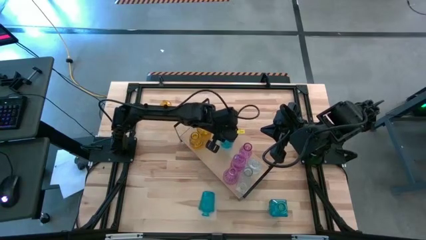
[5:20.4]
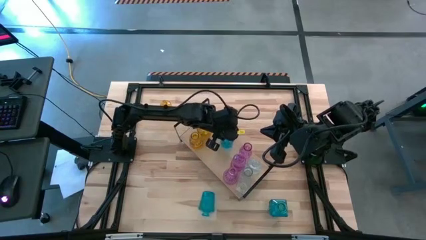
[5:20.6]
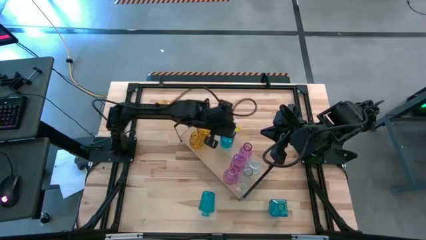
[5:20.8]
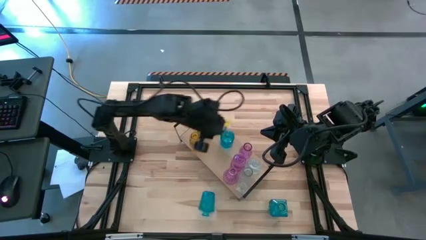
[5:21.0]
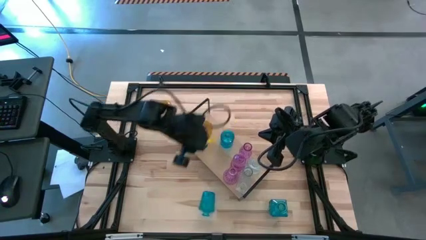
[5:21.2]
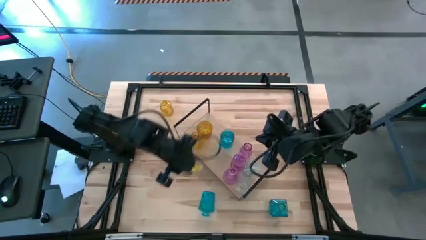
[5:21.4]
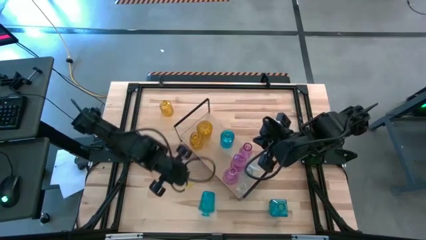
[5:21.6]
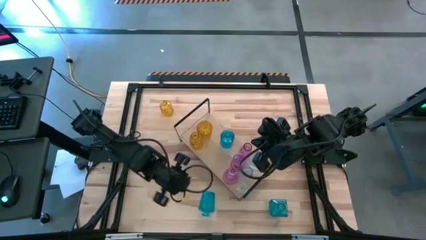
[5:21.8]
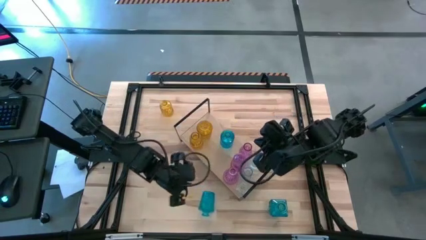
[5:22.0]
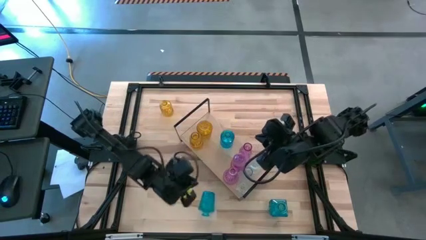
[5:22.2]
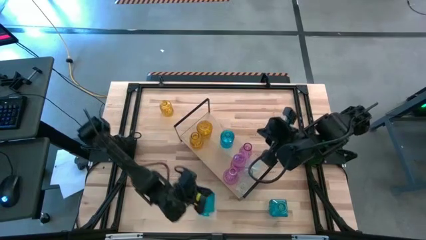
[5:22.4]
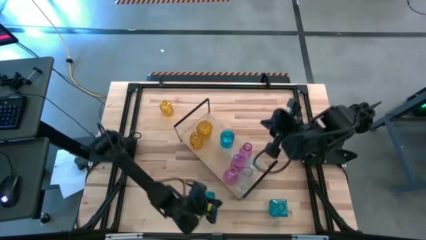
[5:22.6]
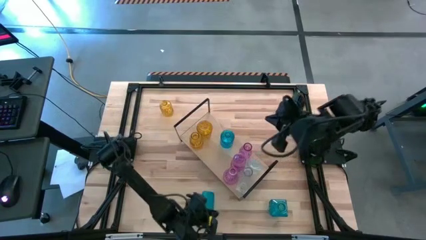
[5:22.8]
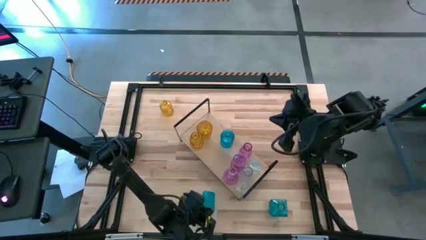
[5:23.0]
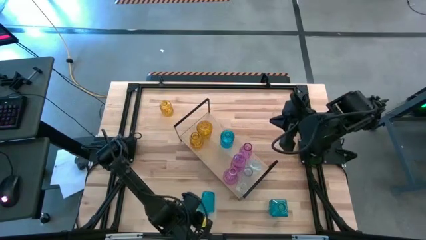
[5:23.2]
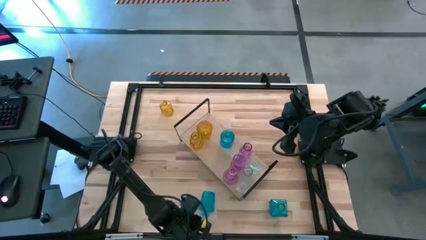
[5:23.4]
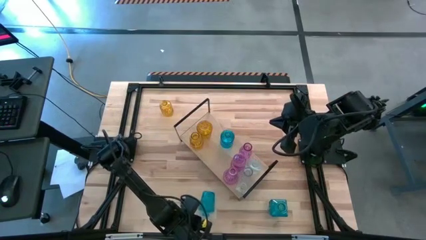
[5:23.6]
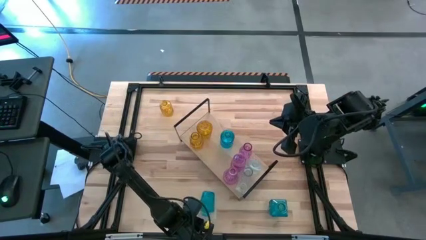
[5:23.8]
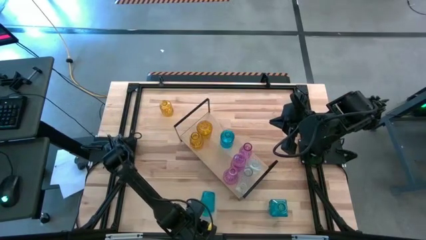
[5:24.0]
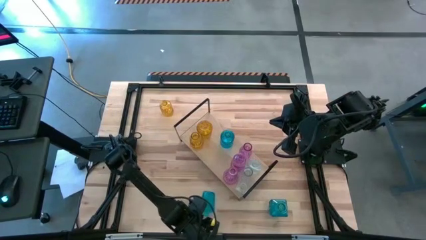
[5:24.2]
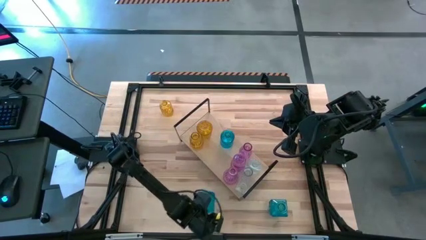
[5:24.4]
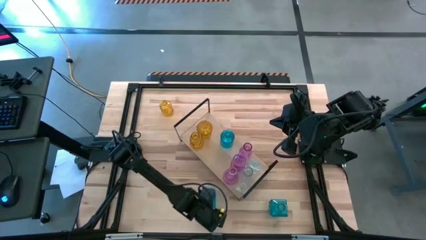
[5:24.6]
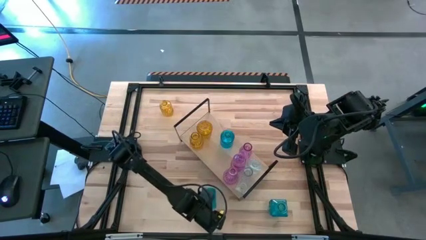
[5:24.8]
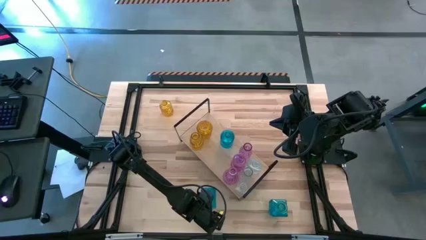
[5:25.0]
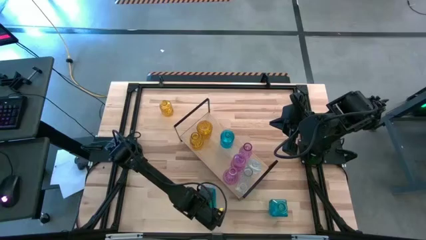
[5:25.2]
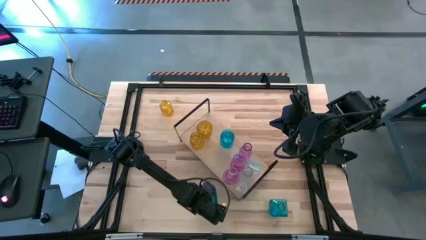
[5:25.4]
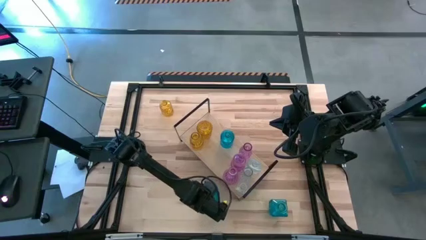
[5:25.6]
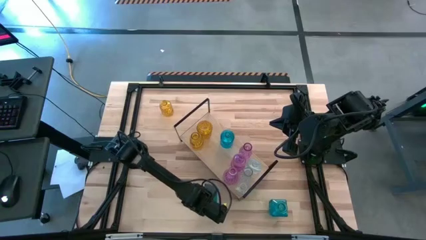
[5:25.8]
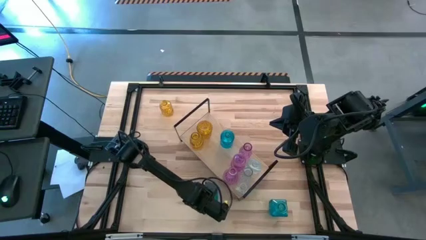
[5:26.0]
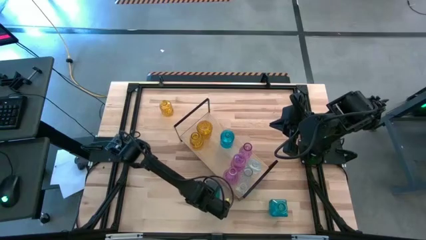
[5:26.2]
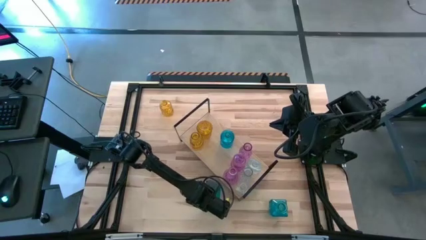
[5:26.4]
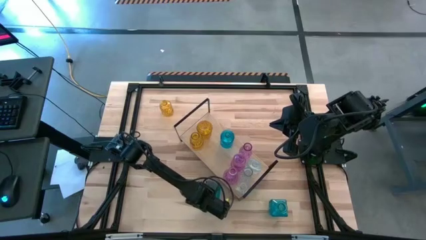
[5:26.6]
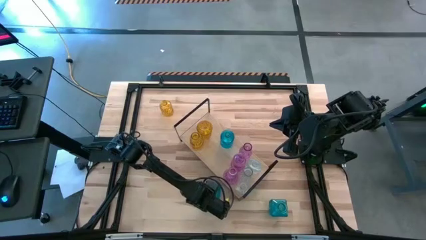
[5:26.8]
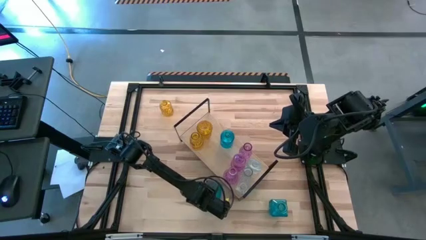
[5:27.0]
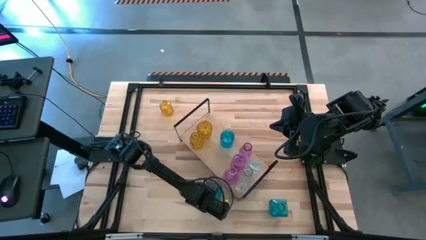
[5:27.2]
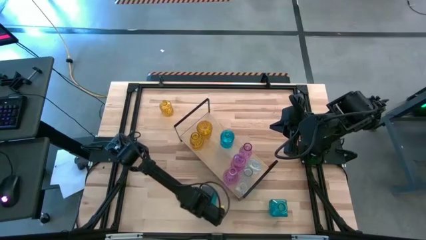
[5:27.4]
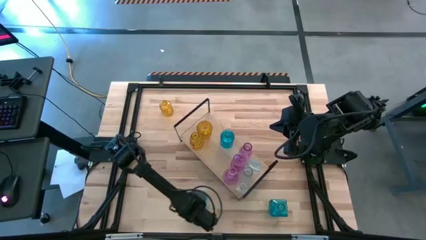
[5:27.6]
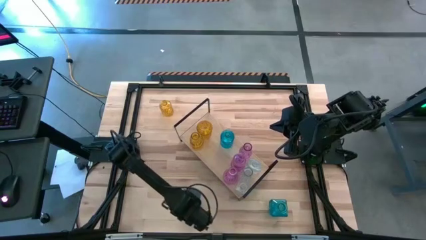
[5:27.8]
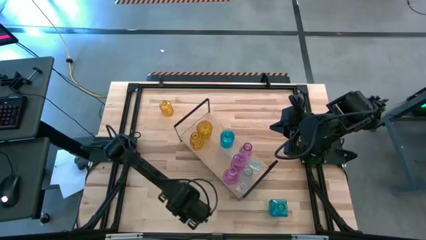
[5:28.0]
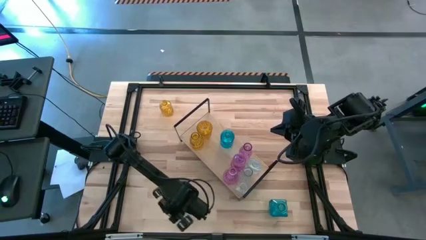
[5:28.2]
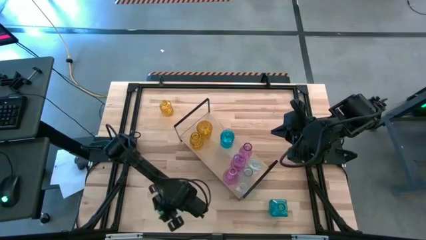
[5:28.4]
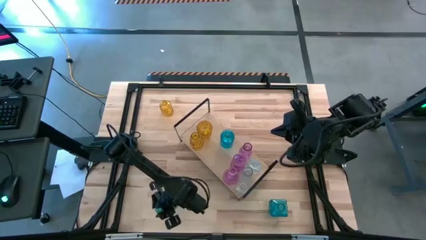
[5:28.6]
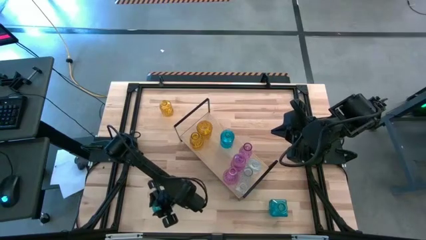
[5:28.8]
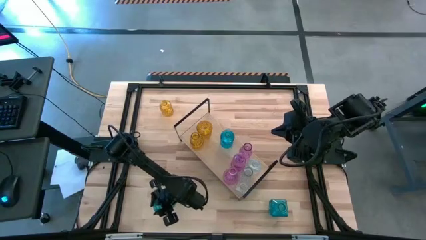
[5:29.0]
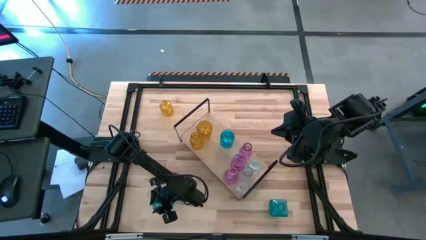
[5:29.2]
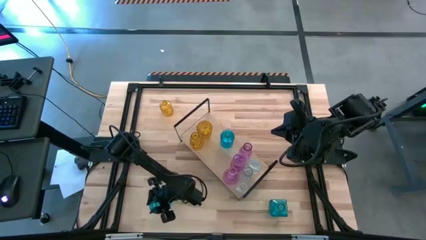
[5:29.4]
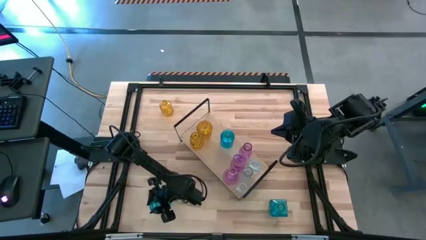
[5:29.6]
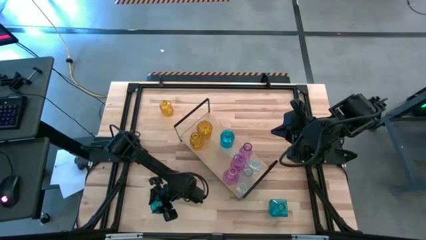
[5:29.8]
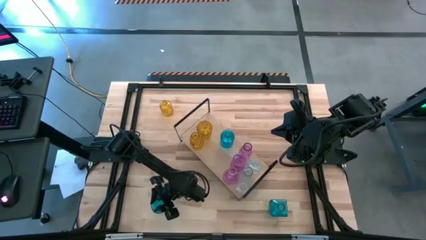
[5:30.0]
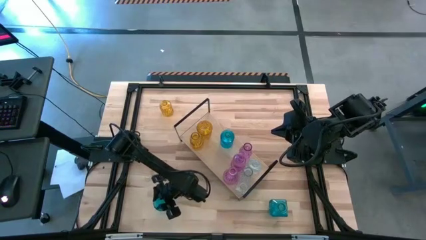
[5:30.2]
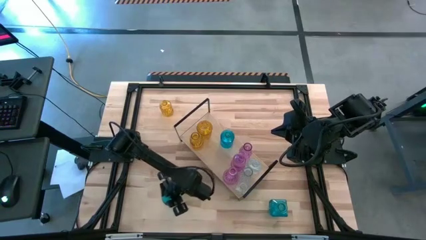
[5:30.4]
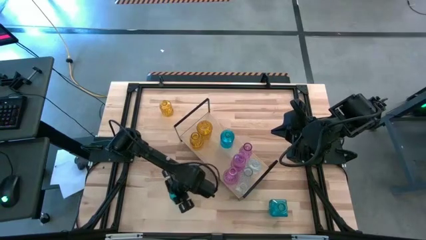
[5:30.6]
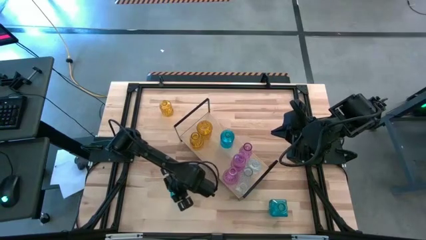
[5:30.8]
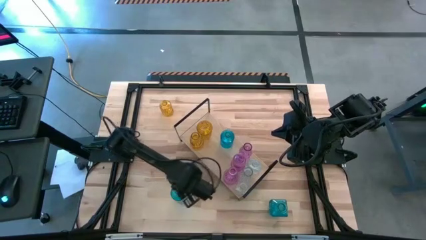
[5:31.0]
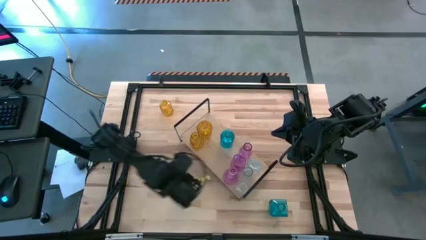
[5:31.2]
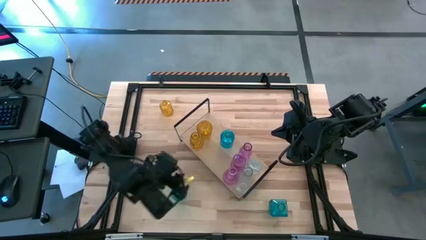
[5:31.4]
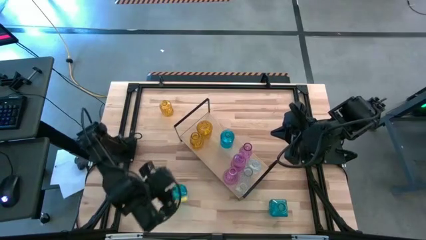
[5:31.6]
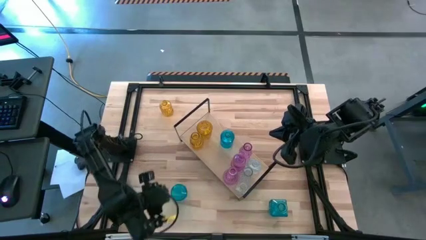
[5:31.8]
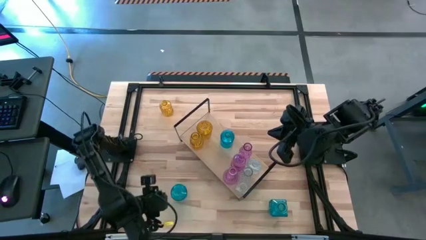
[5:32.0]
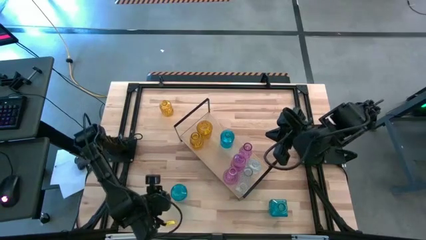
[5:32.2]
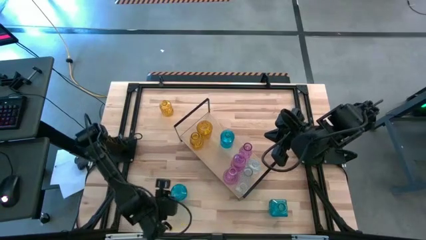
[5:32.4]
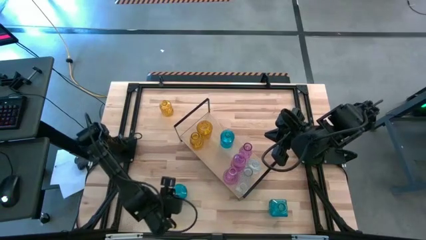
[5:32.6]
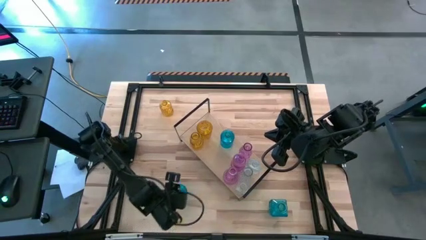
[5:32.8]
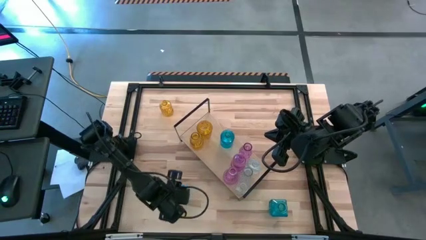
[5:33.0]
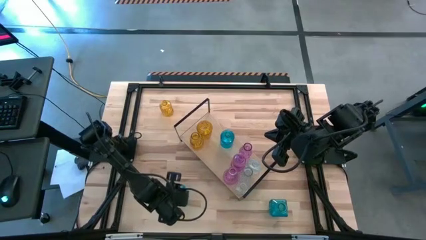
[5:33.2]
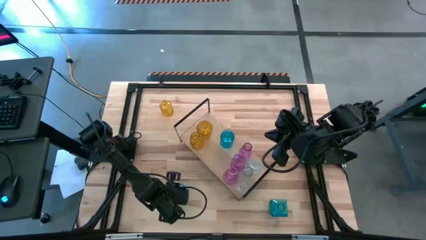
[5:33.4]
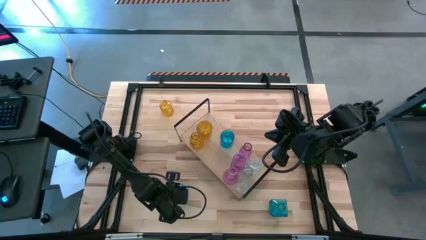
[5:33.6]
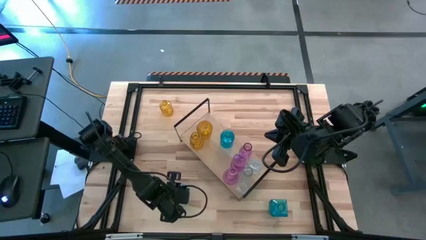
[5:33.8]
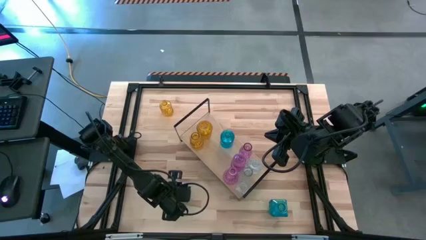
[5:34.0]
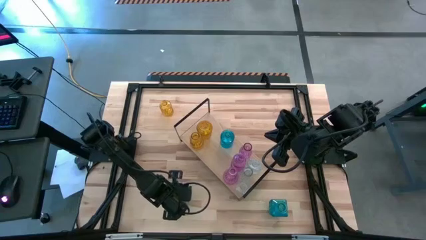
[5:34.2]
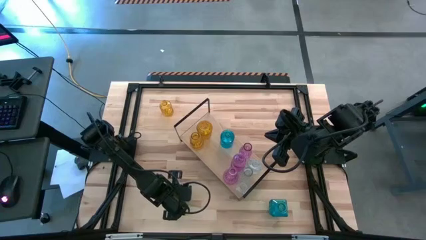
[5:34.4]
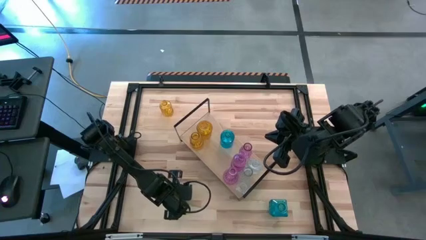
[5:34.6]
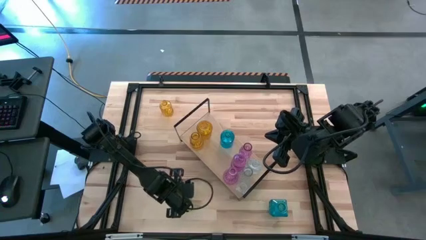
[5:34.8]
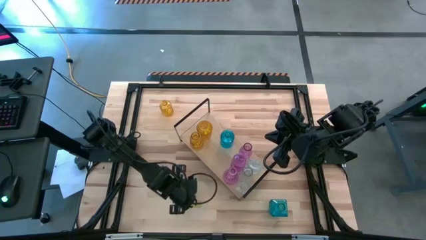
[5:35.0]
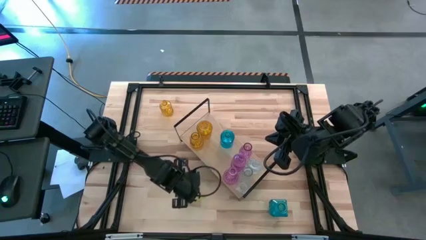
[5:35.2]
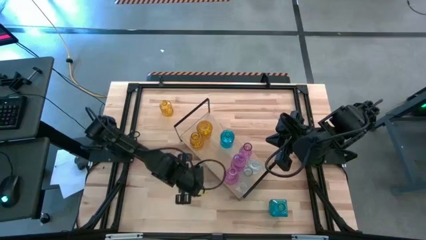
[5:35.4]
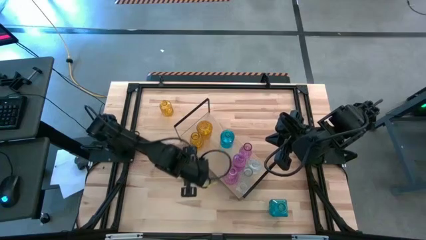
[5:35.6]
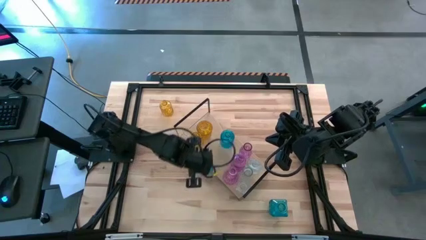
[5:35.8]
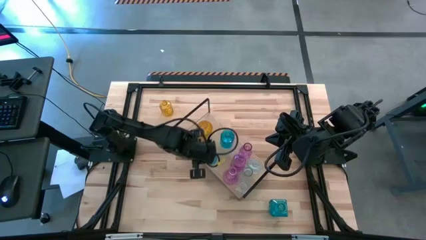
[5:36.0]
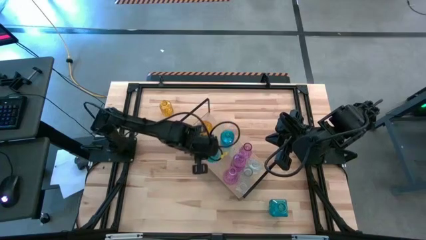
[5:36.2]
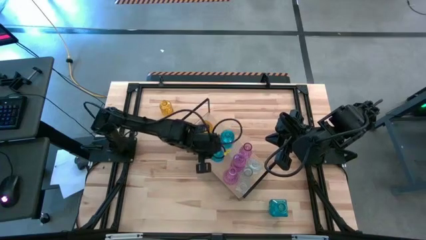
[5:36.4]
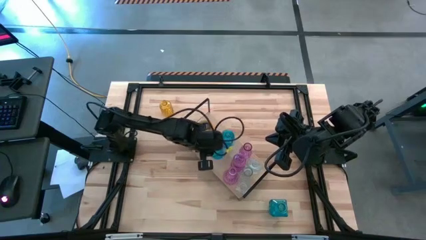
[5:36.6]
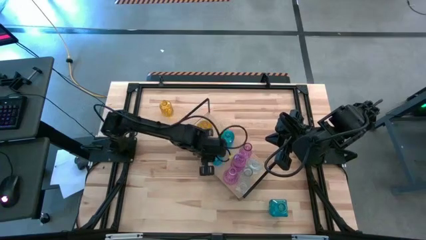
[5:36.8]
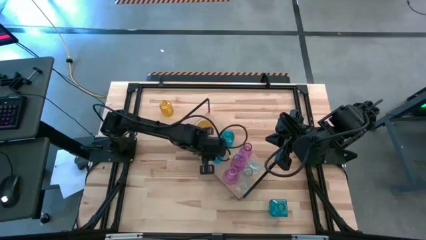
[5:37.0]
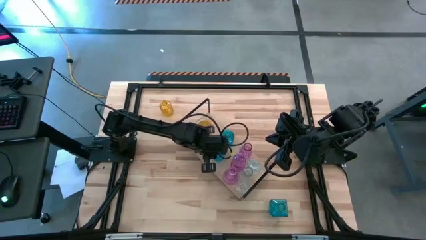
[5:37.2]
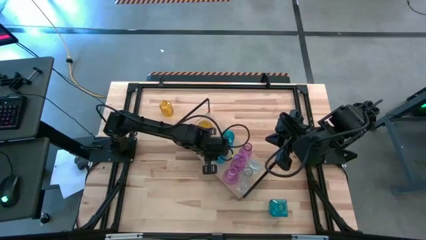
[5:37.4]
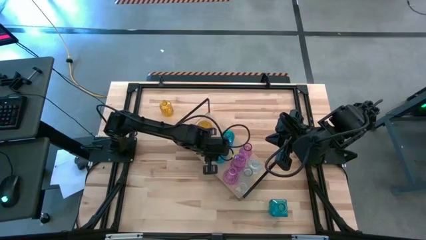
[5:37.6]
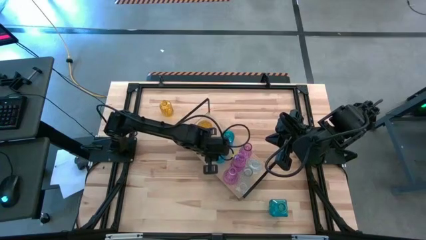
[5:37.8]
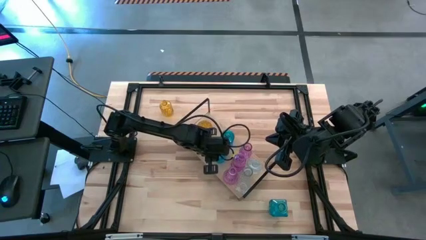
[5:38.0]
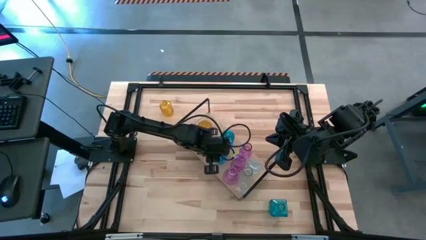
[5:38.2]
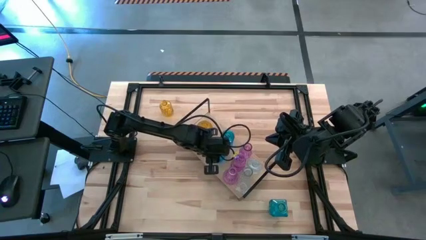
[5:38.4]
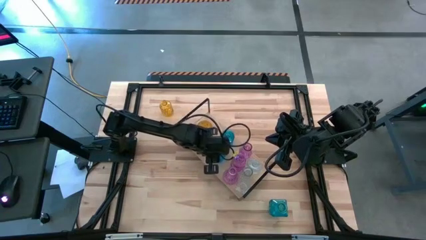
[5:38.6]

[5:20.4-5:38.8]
Task: sort vases onto shelf
Put the left blue crystal vase on the shelf
